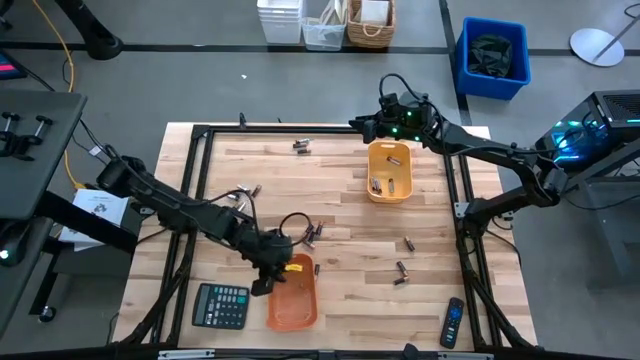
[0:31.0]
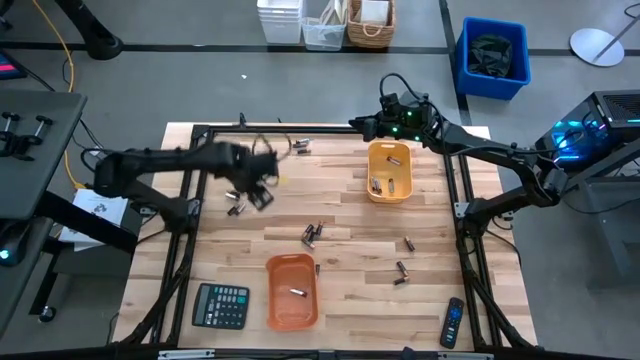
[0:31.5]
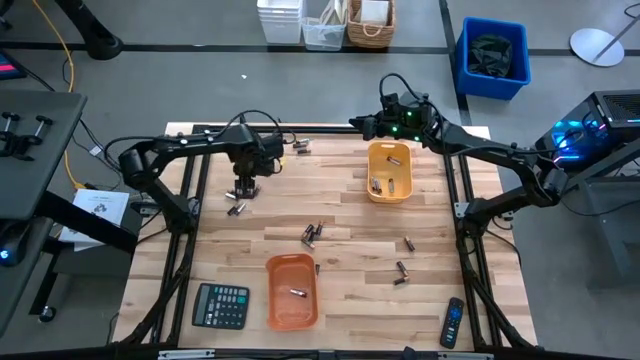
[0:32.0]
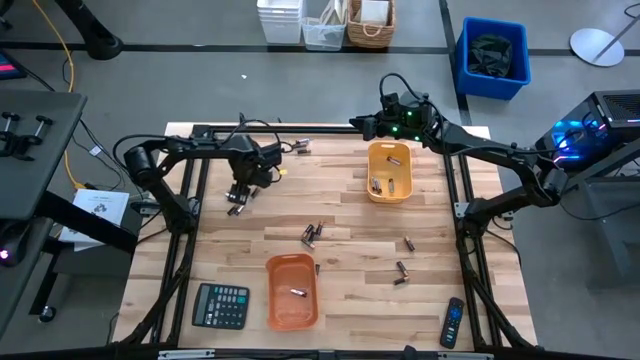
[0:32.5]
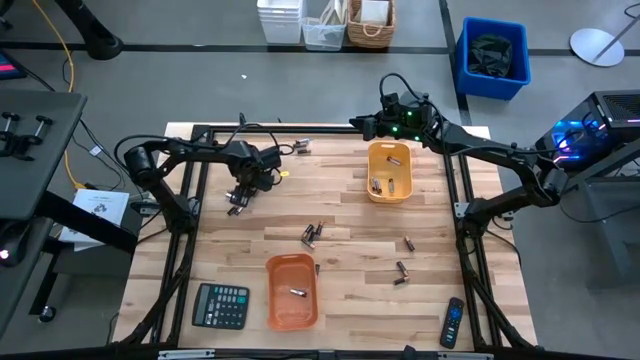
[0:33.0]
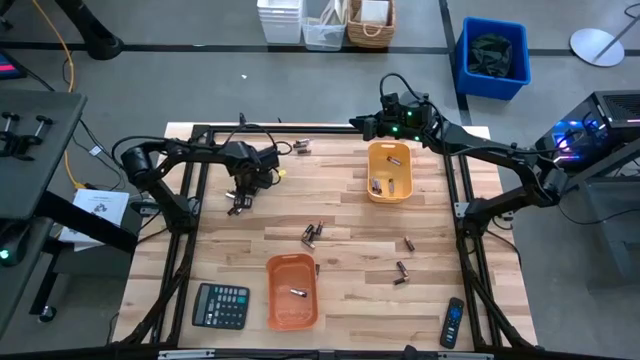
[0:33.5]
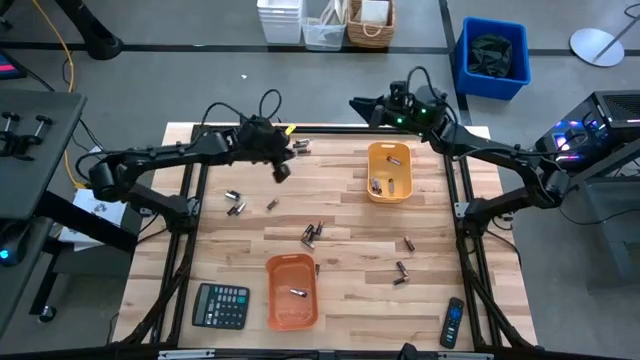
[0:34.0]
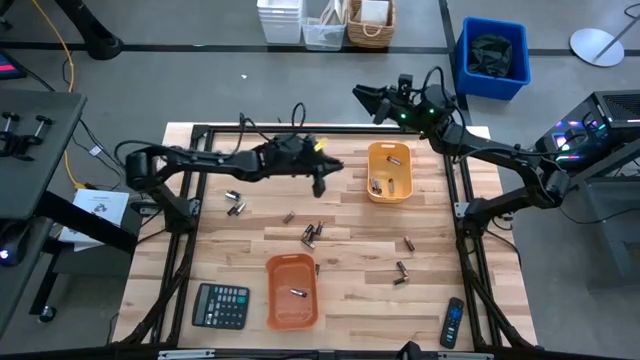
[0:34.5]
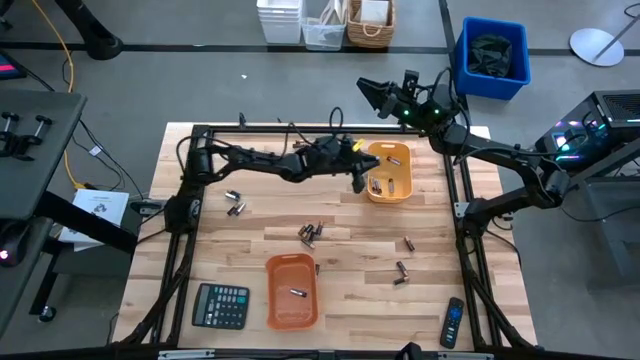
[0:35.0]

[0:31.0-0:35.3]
Task: Sort batteries
Put the silver battery into the yellow bin

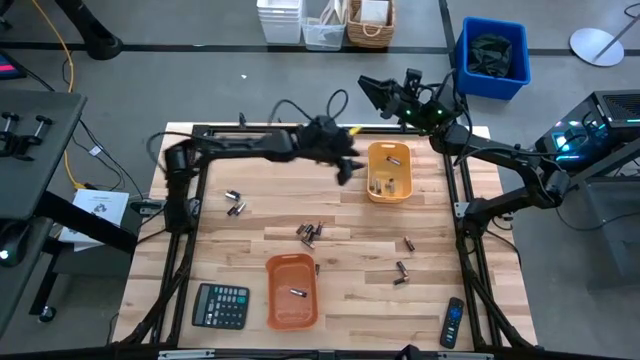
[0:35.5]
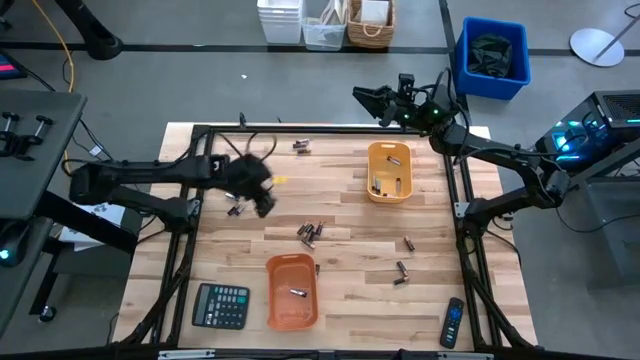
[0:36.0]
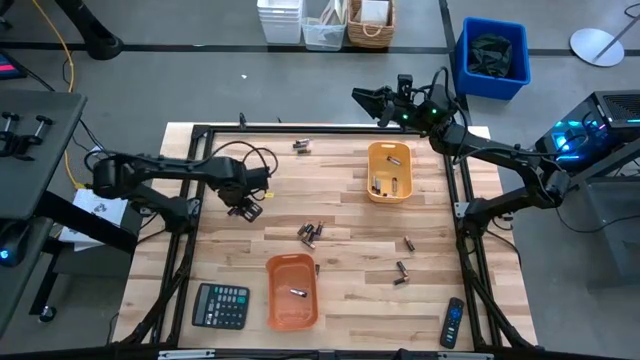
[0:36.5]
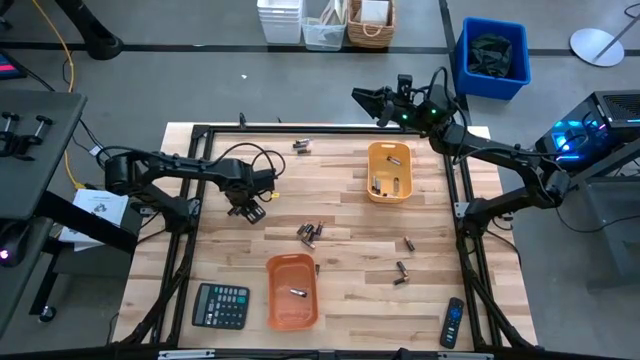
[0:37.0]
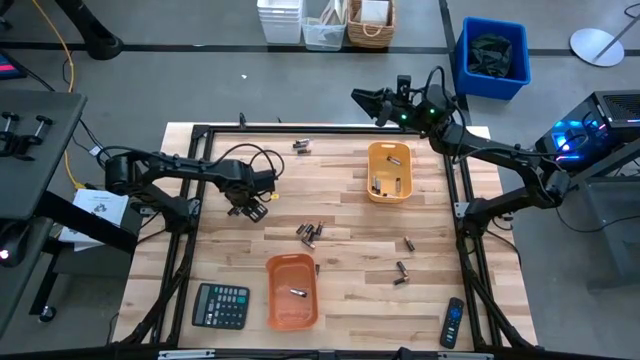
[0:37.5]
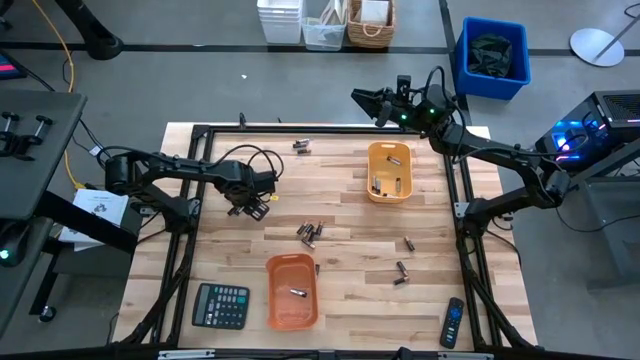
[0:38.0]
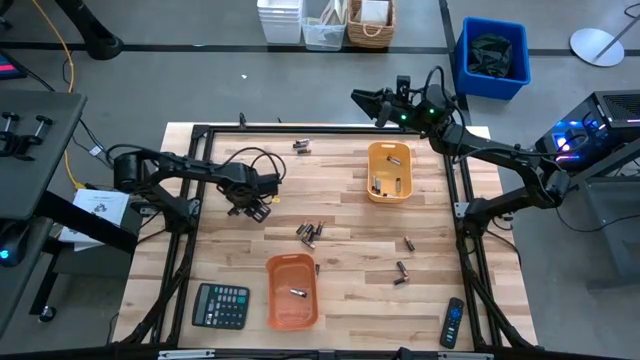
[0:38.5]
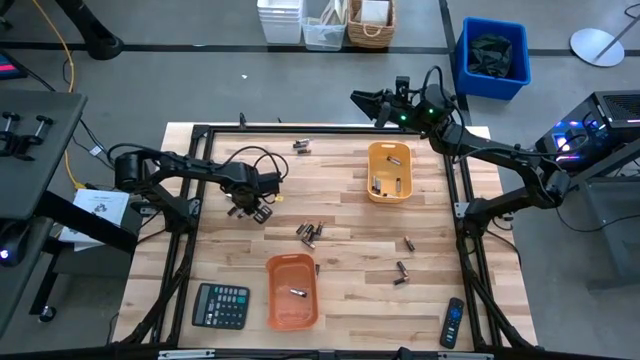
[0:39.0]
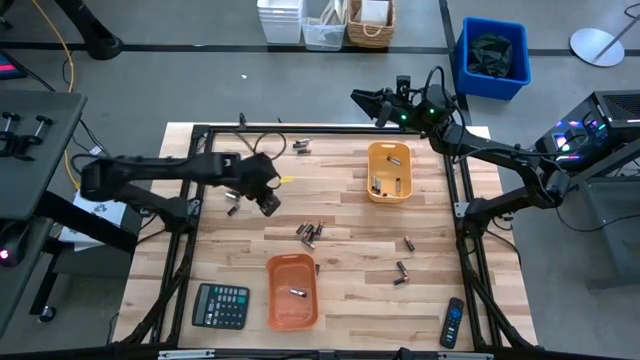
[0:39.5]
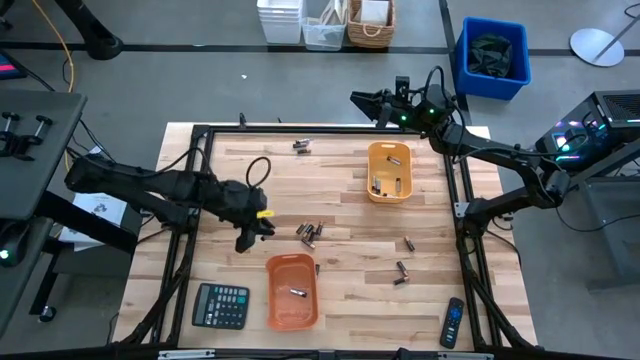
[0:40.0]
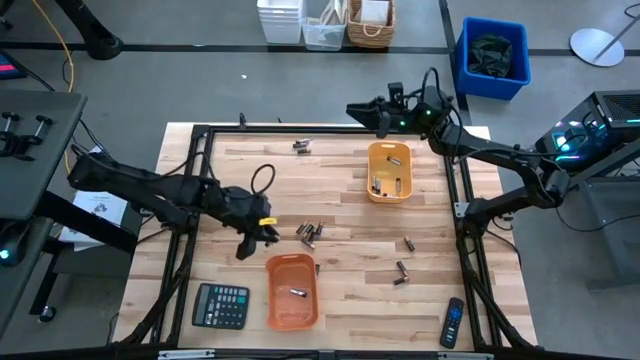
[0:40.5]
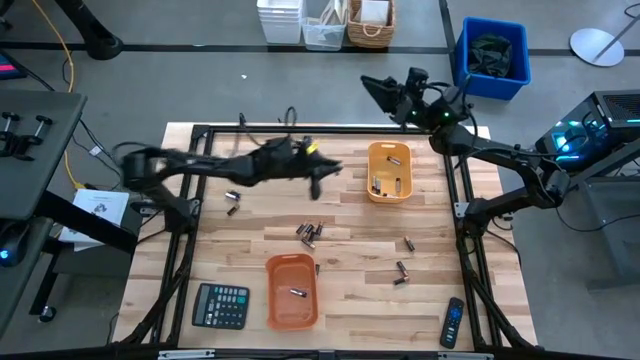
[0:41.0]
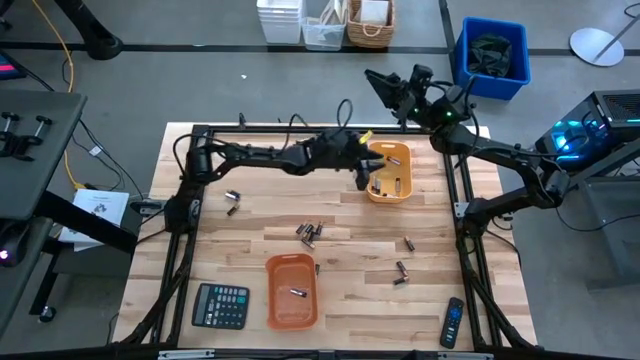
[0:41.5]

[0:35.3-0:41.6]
Put the silver battery into the yellow bin

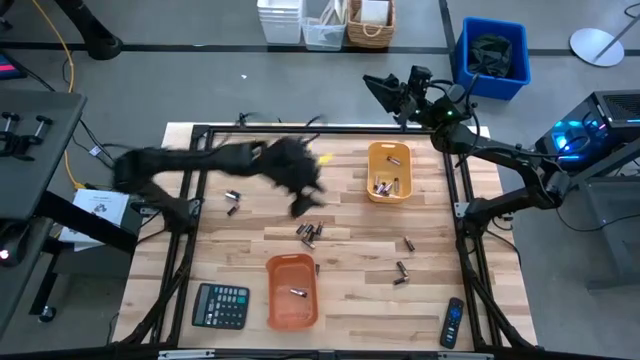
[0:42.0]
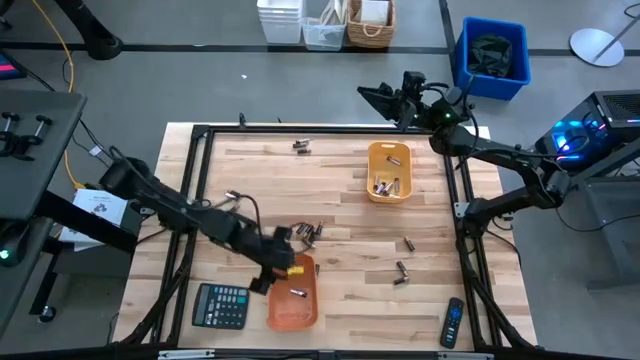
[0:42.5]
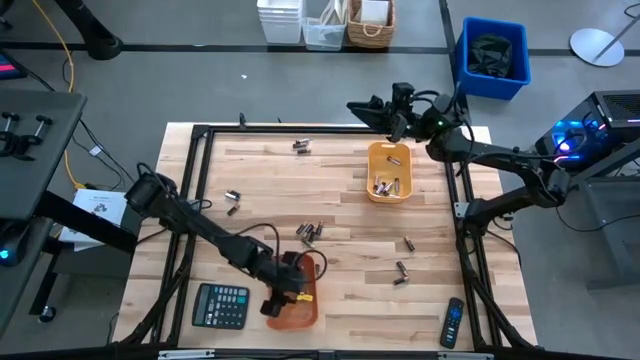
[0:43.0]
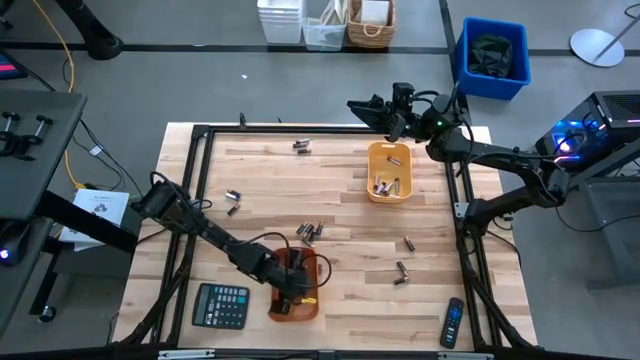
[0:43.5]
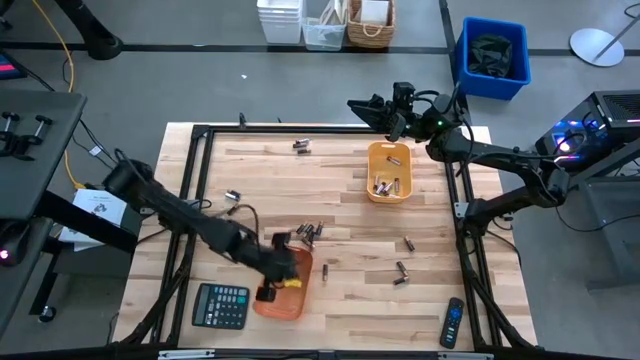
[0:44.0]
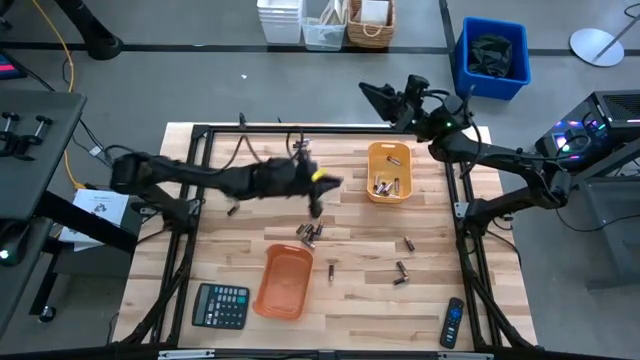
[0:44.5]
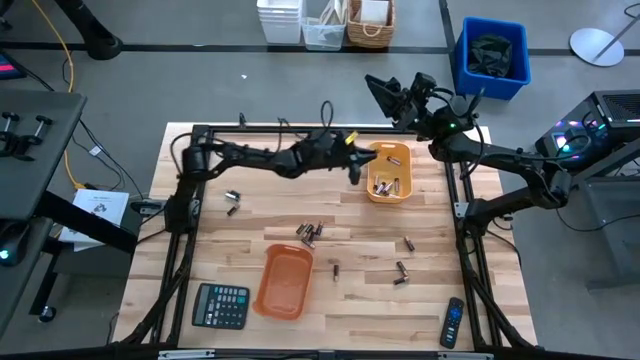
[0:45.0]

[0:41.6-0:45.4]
Put the silver battery into the yellow bin

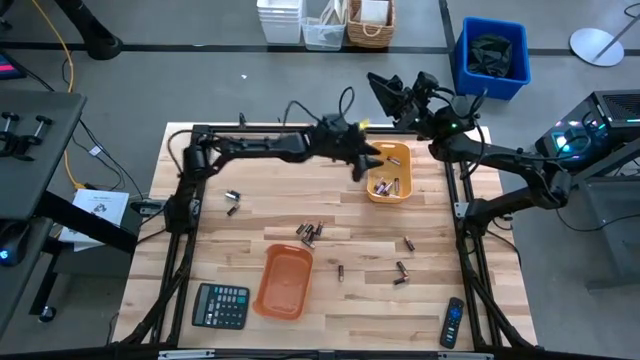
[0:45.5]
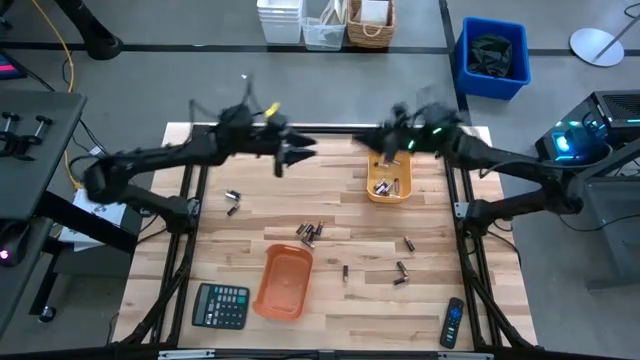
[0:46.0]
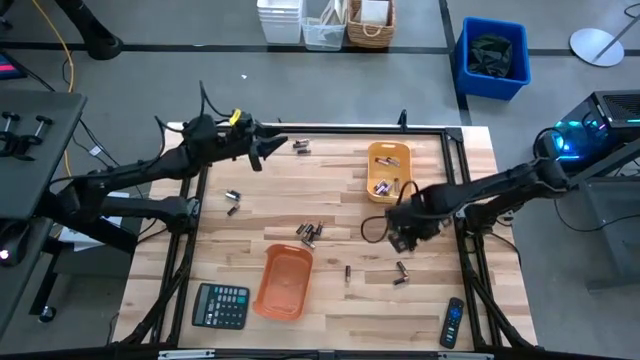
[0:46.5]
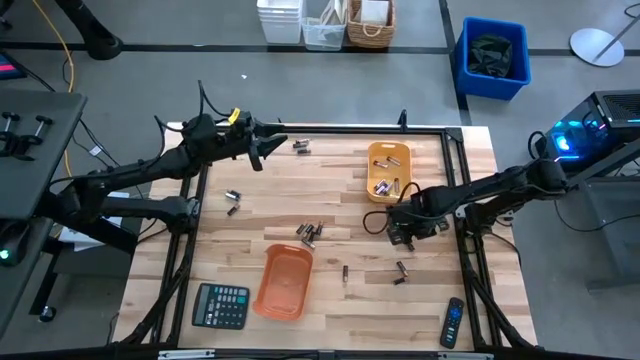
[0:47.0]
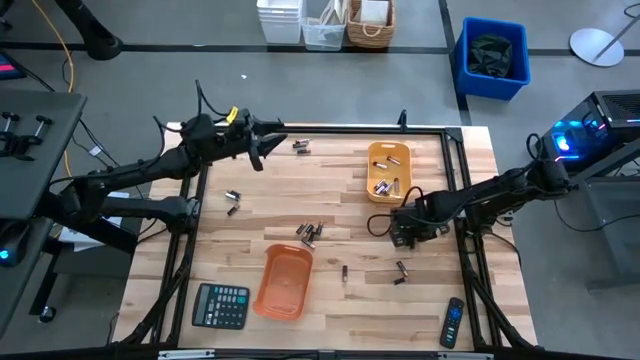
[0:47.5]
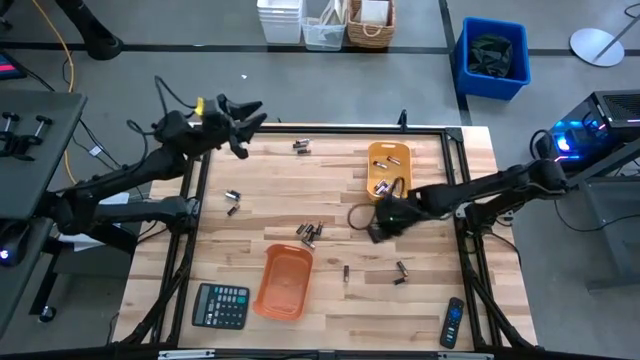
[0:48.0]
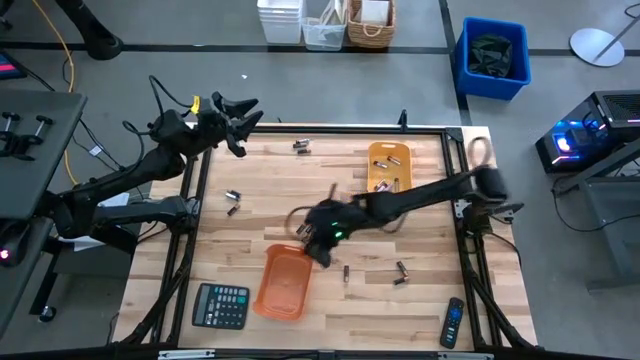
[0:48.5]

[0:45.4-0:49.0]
Put the black battery into the orange bin

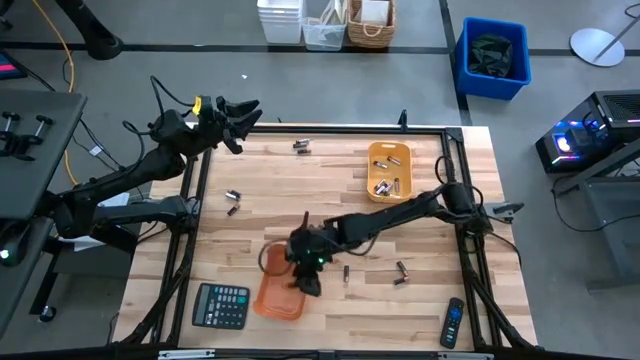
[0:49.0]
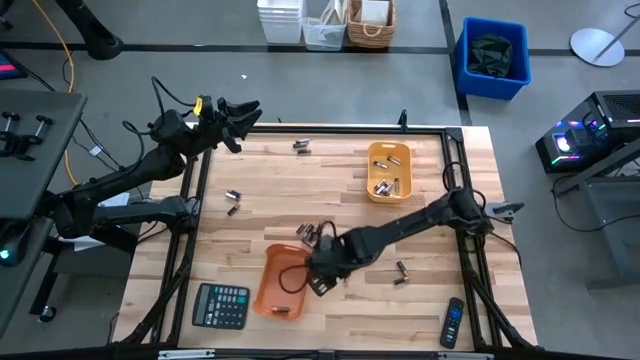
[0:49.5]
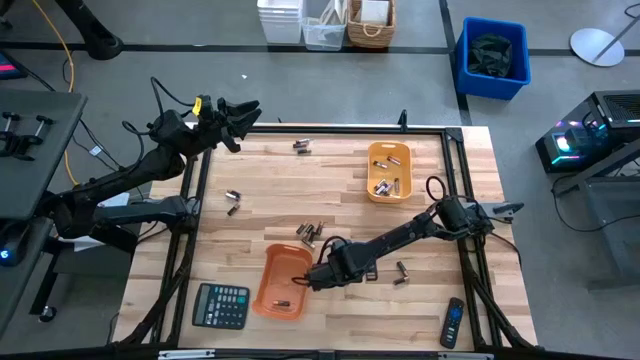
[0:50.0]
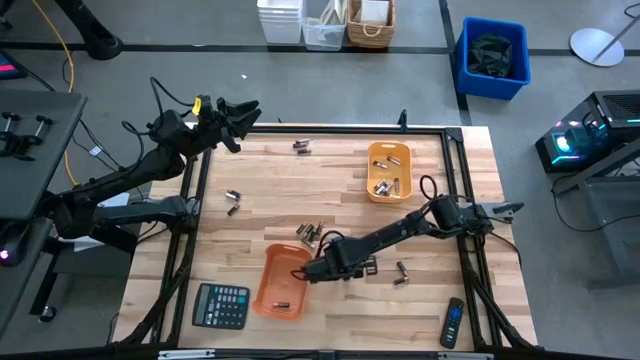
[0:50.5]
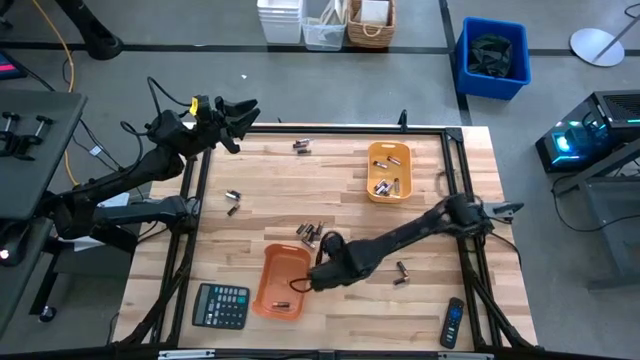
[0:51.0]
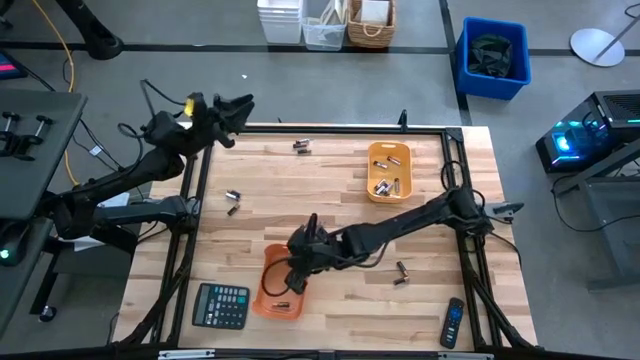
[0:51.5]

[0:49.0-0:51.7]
Put the black battery into the orange bin
